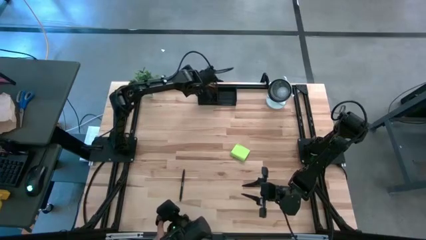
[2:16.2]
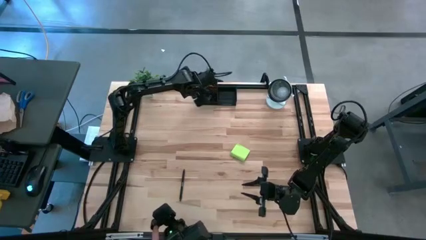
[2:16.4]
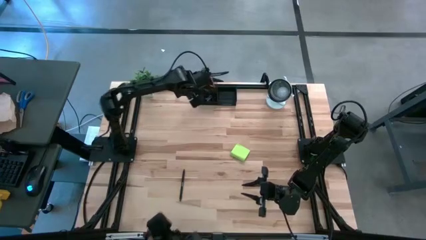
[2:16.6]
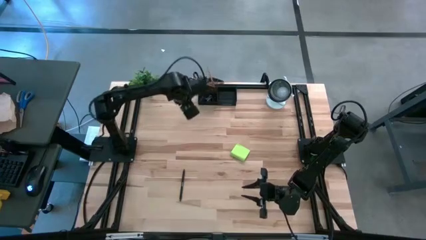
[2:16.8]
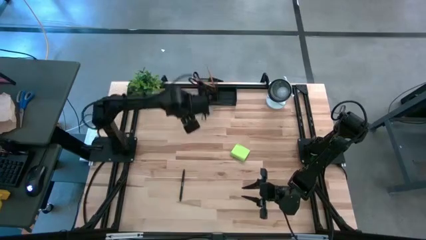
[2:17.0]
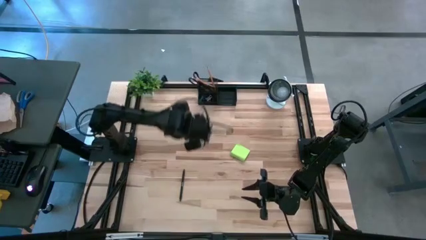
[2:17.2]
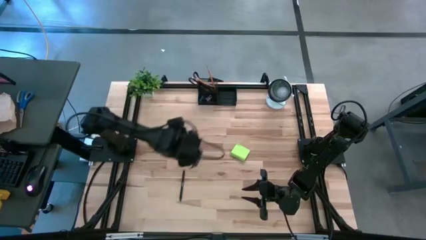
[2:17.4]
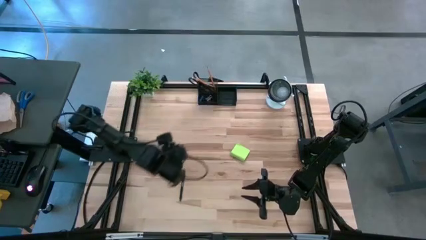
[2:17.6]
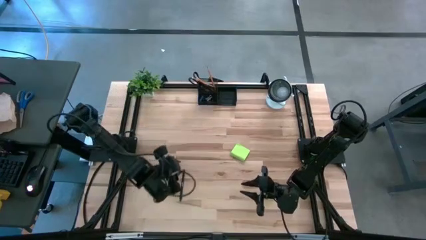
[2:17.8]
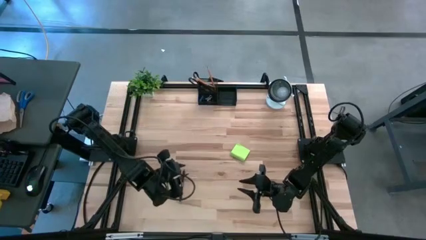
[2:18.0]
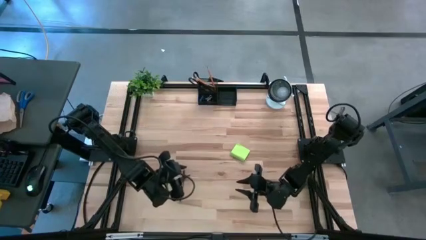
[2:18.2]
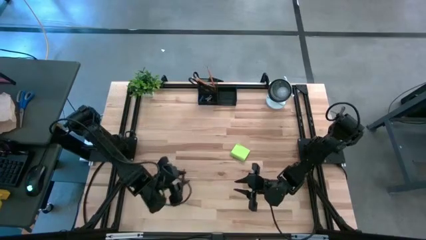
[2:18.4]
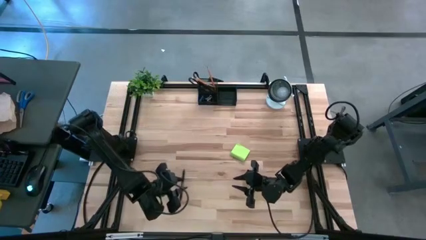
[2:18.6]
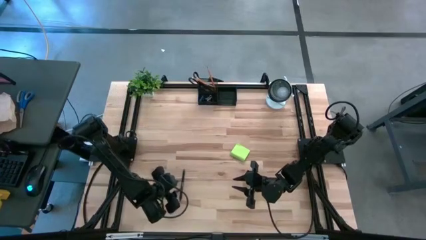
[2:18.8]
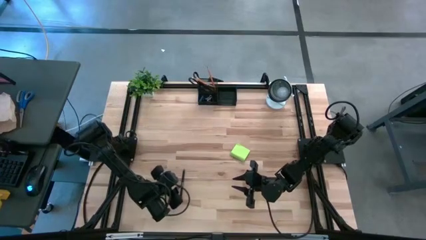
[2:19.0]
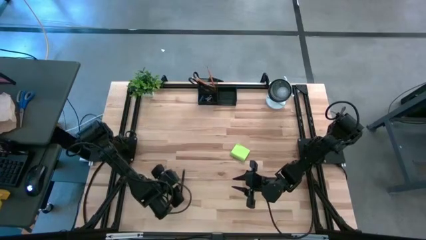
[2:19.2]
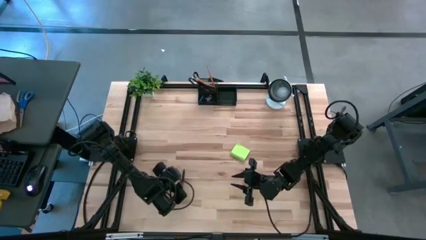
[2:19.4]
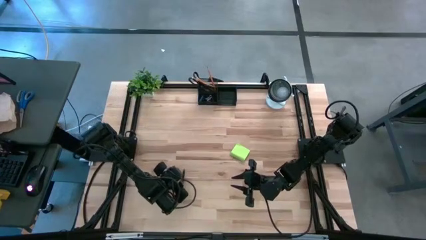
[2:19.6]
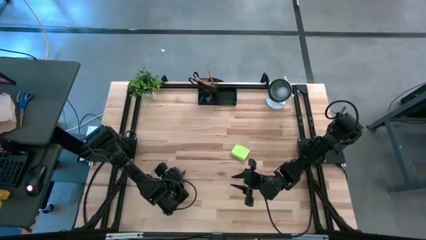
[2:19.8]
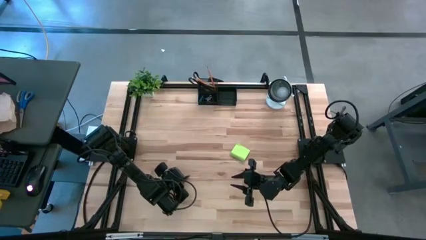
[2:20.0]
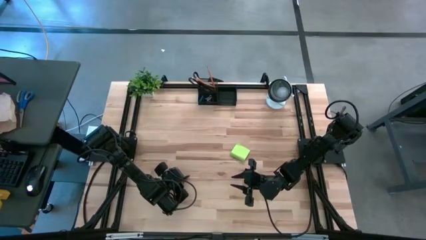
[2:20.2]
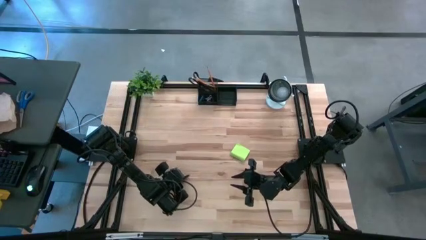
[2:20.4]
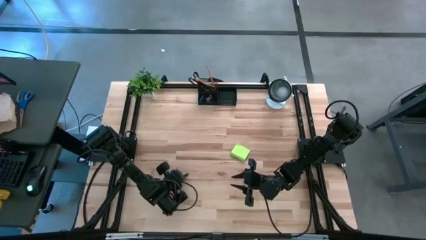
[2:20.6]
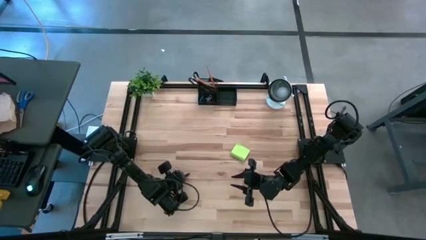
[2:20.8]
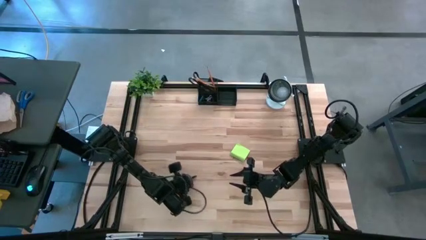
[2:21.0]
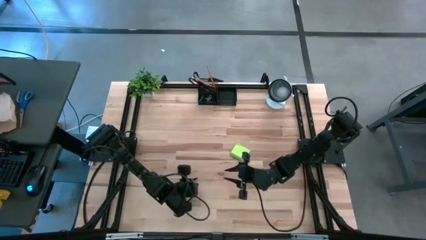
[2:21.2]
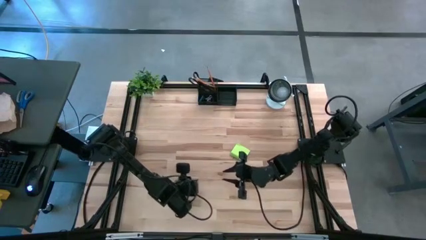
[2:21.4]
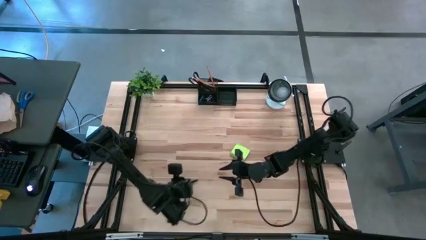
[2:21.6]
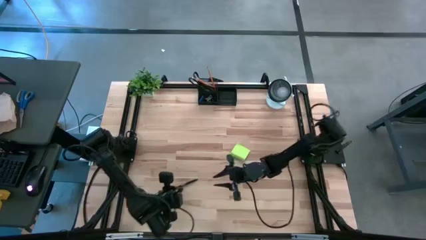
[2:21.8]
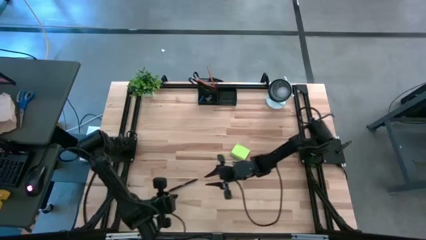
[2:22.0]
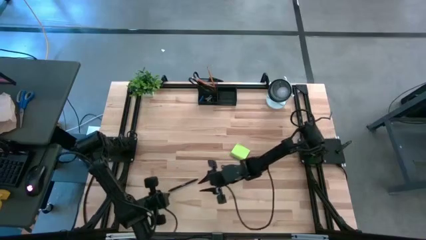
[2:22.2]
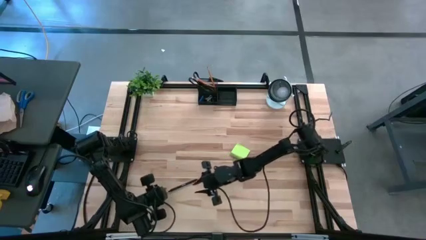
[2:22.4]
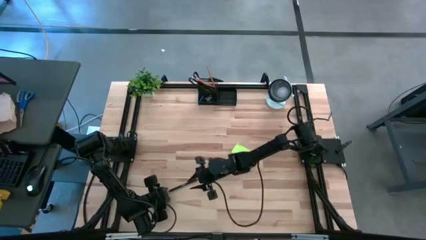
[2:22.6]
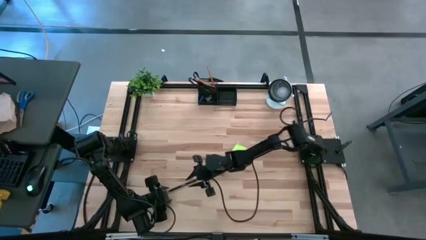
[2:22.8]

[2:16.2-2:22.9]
Task: Pick and place office supplies into organizer
Put the black pen into the black desk organizer

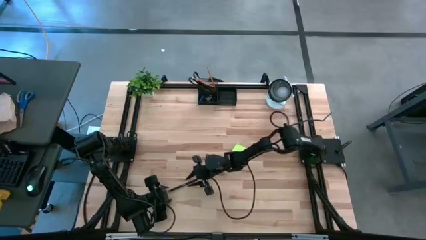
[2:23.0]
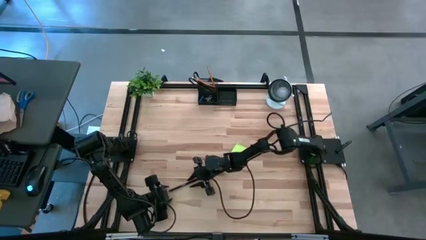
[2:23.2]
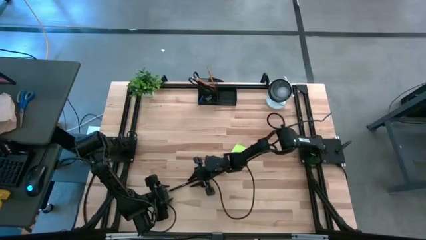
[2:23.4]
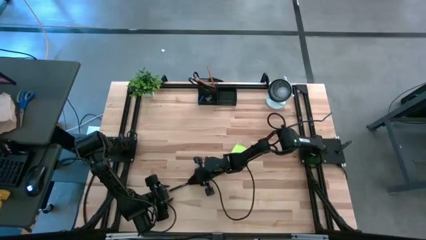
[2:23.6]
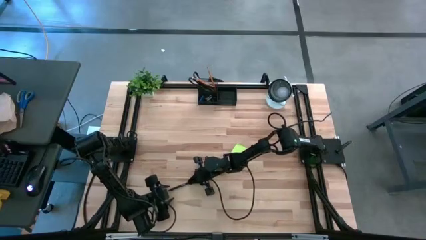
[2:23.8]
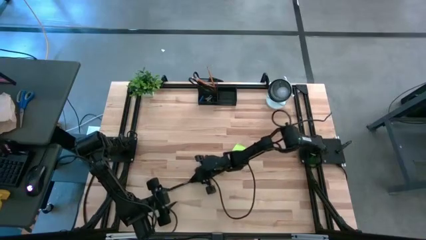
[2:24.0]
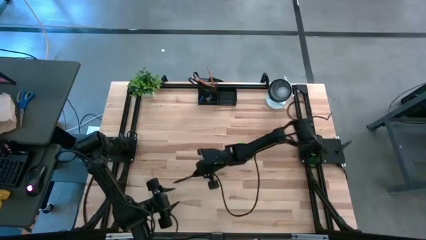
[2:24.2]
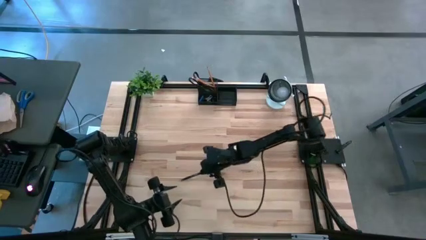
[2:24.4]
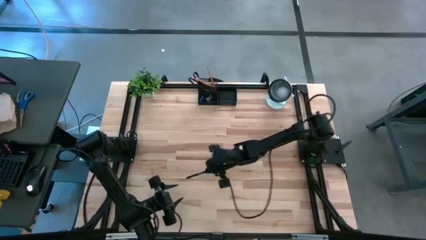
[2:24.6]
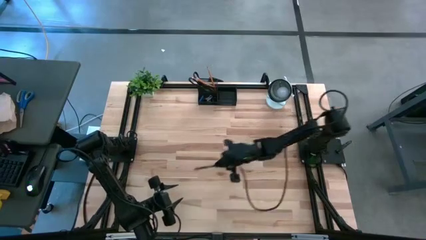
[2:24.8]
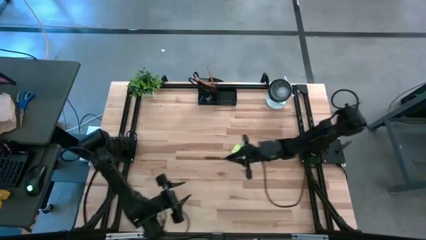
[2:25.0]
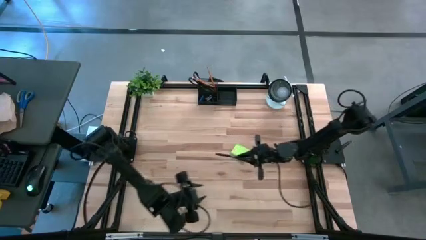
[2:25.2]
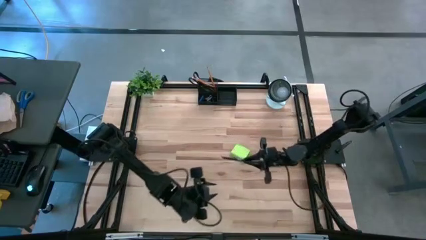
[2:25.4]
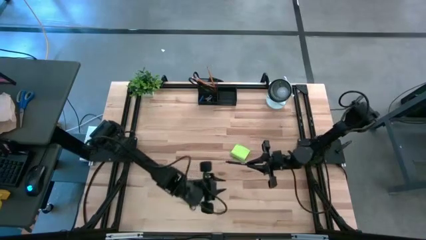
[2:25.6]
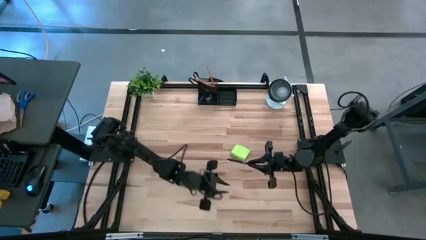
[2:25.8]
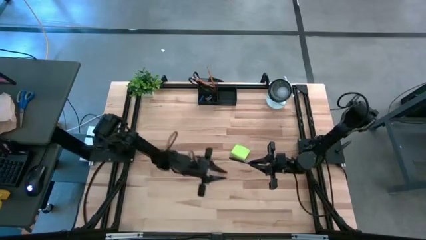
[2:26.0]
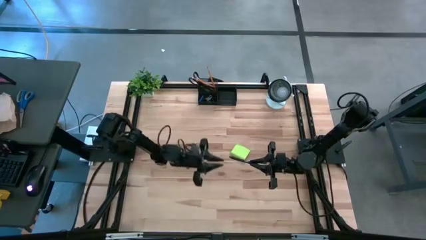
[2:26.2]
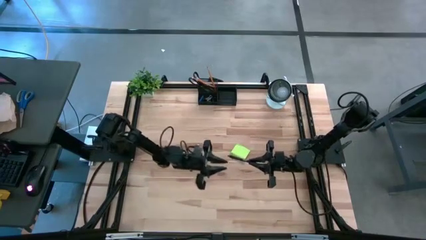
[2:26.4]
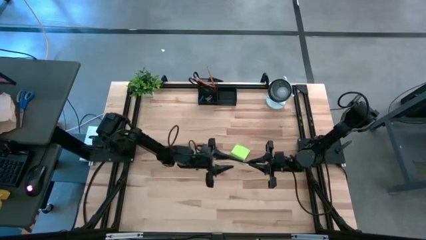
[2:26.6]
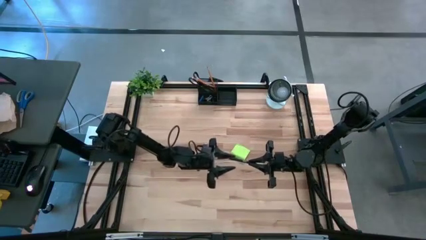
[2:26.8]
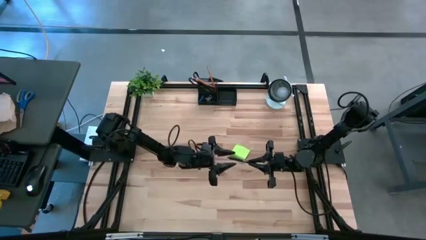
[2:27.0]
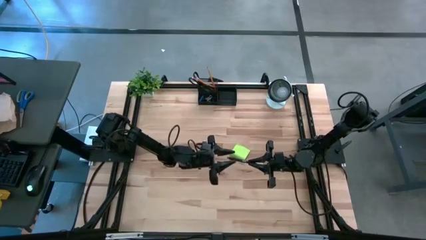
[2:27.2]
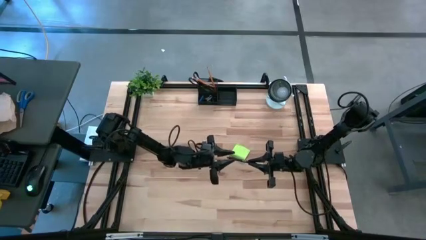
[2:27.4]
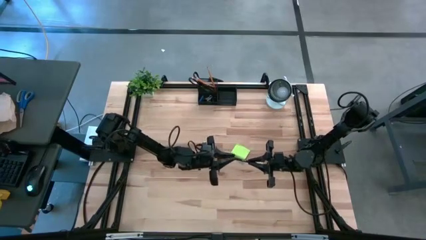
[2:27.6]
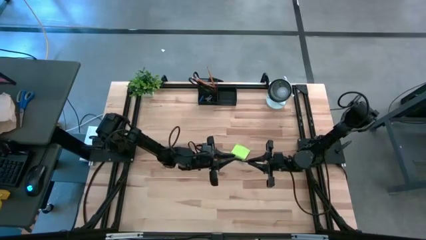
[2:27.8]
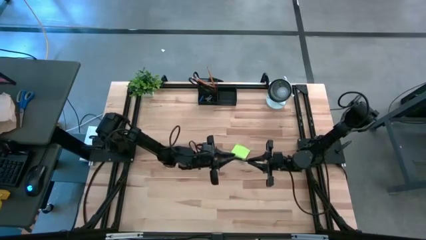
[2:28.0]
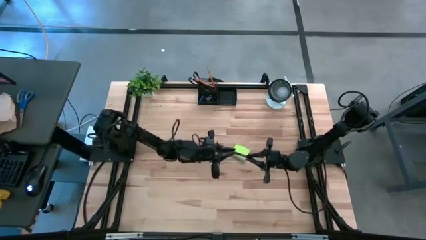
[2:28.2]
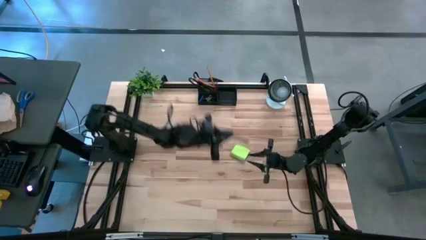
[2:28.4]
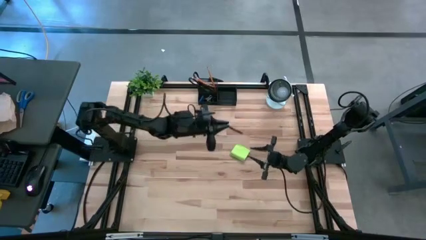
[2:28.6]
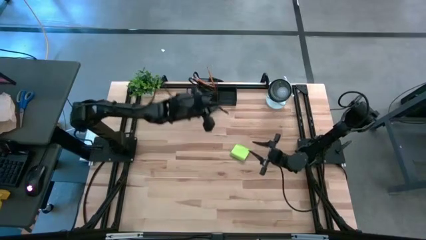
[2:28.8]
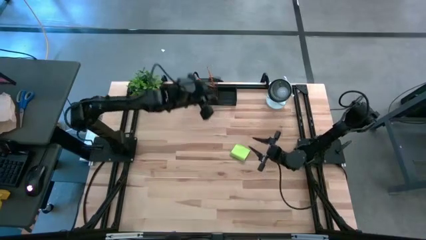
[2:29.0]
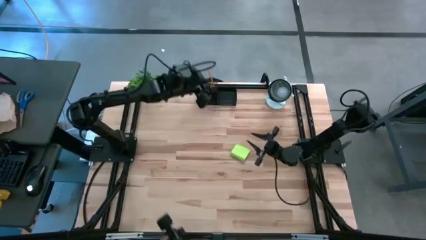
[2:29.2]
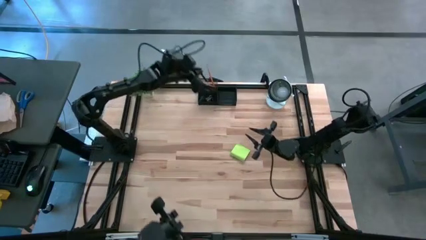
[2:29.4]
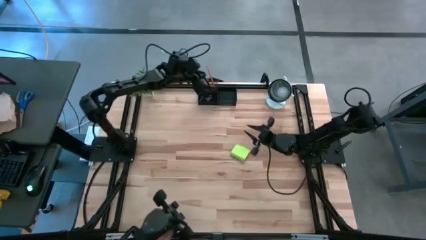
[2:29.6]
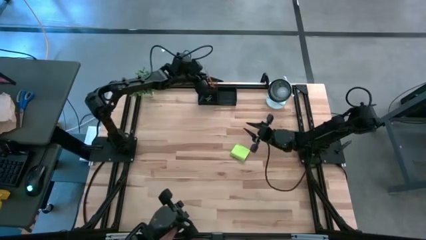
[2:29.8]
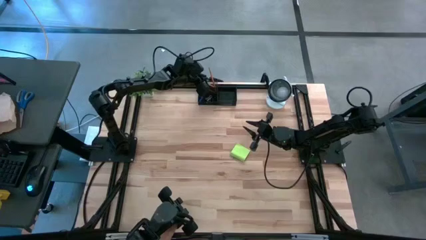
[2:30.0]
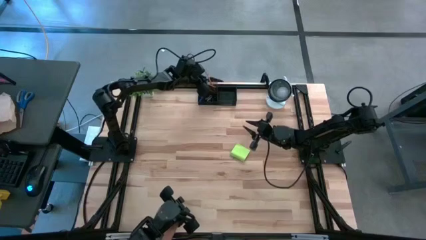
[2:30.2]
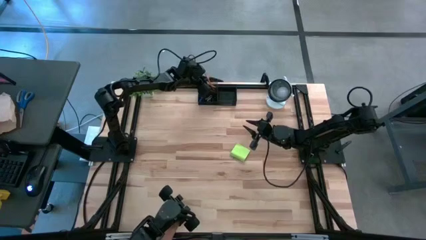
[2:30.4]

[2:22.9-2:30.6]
Put the black pen into the black desk organizer
